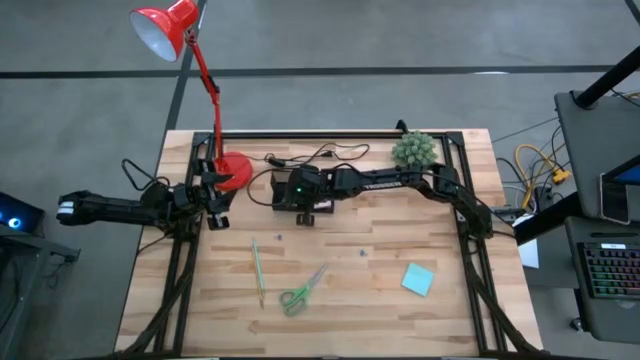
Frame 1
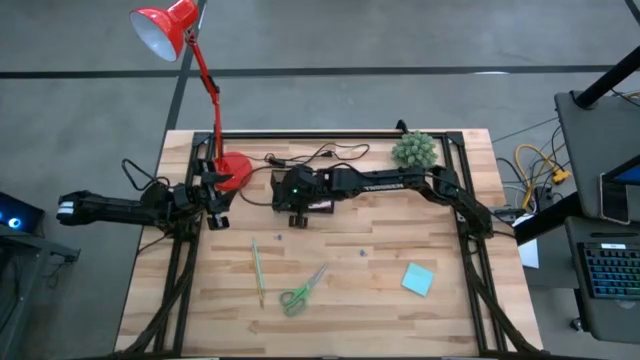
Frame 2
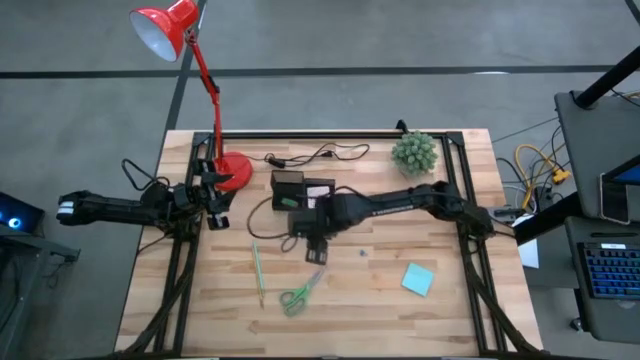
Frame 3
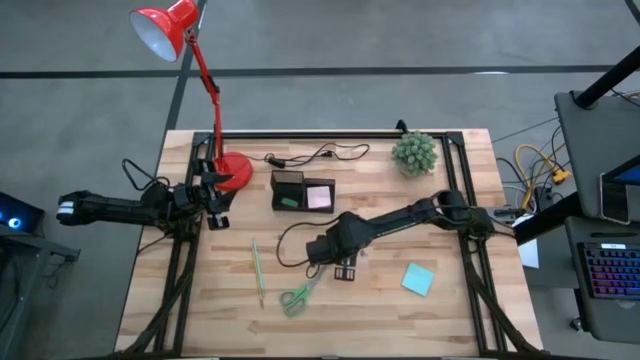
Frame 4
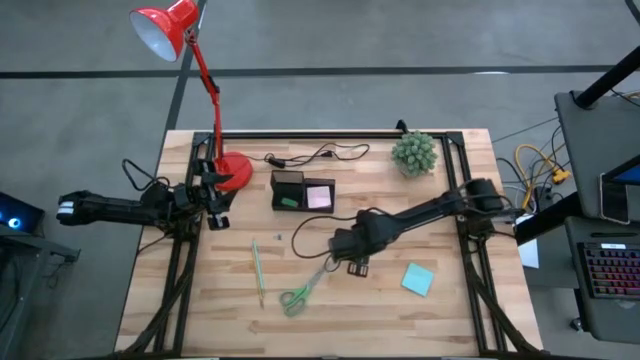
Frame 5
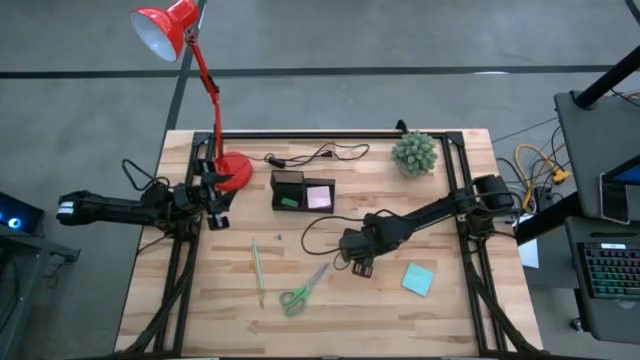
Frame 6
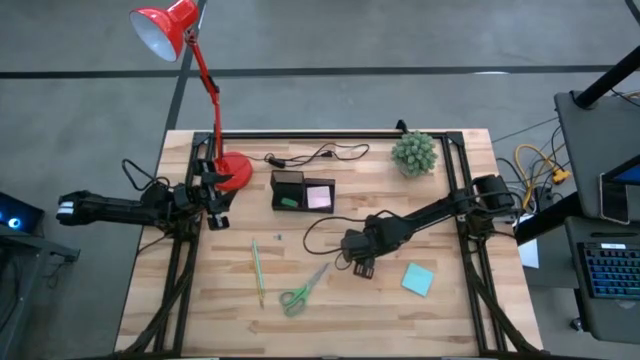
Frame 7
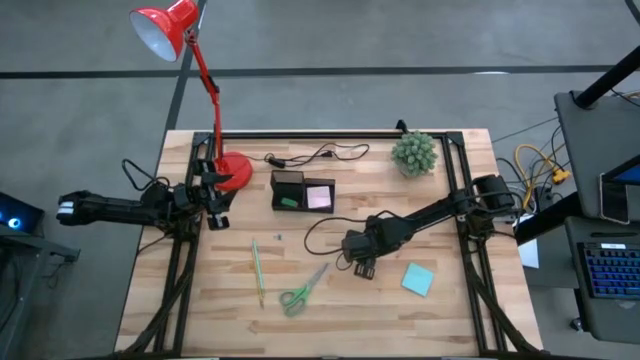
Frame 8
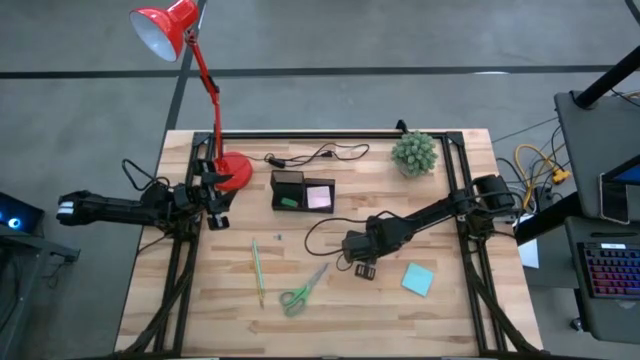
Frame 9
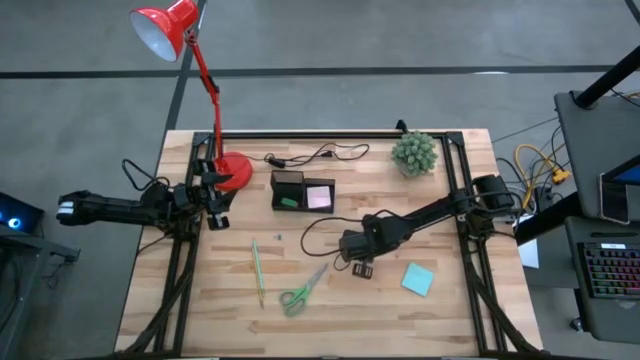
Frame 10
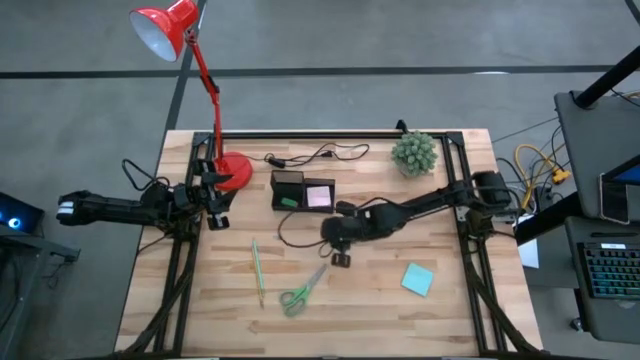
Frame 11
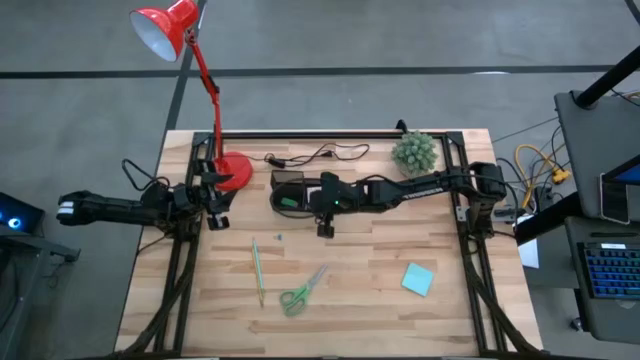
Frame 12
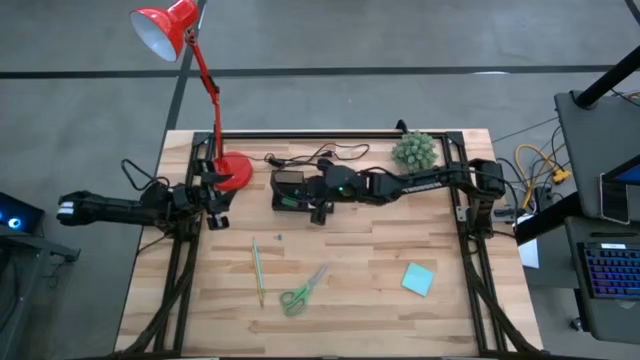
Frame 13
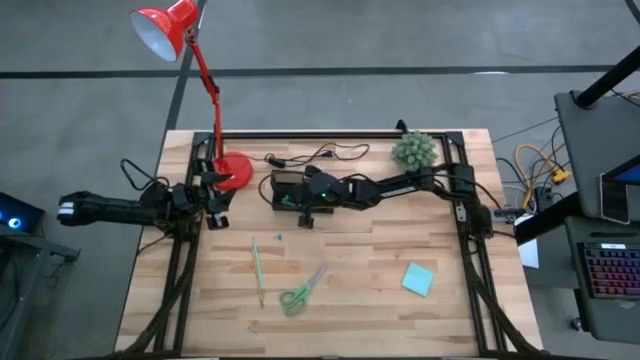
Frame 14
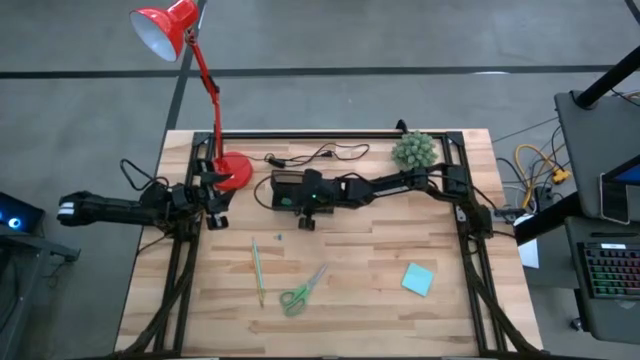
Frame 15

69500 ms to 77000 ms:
Task: Pick and place office supplies into organizer
Put the right blue clip binder into the black mesh desk organizer

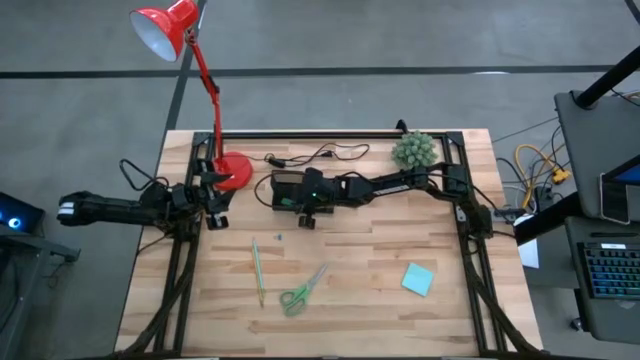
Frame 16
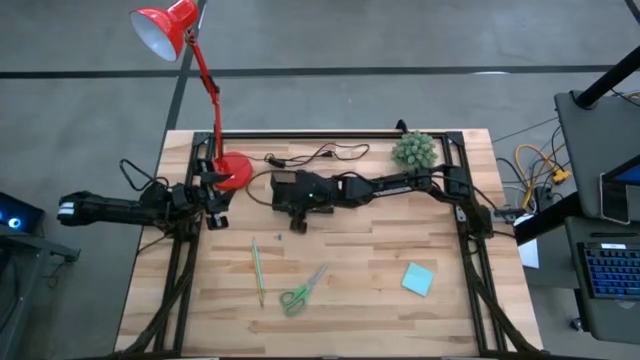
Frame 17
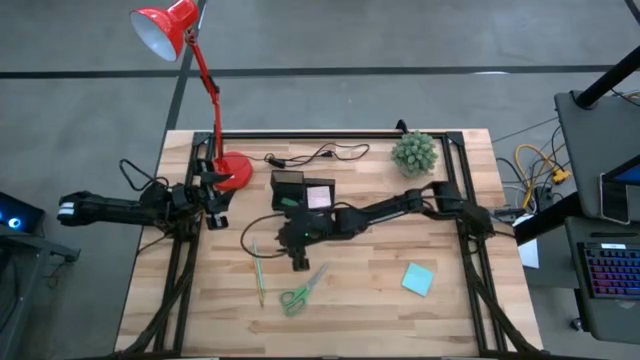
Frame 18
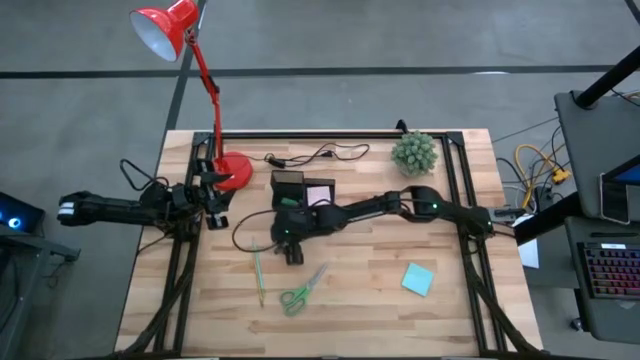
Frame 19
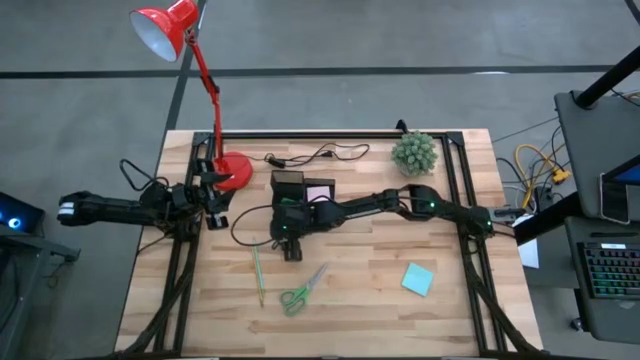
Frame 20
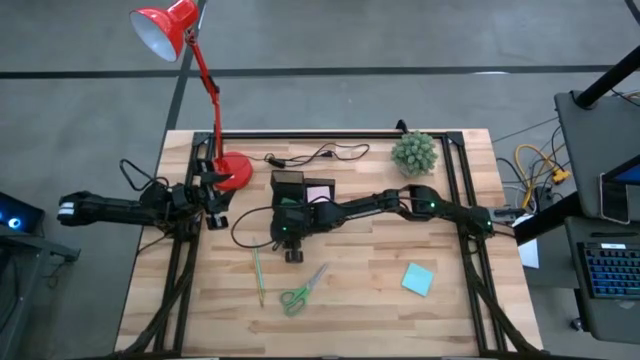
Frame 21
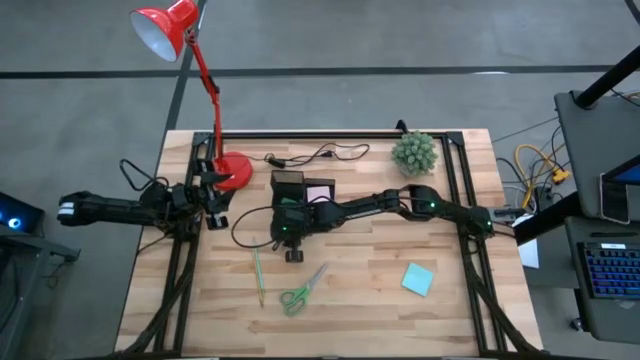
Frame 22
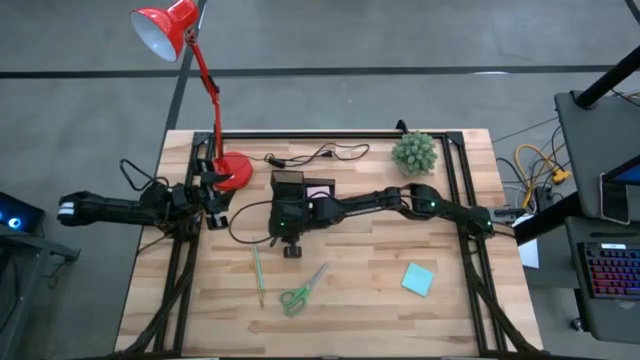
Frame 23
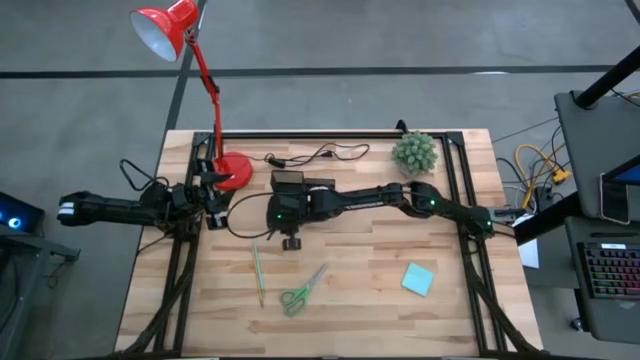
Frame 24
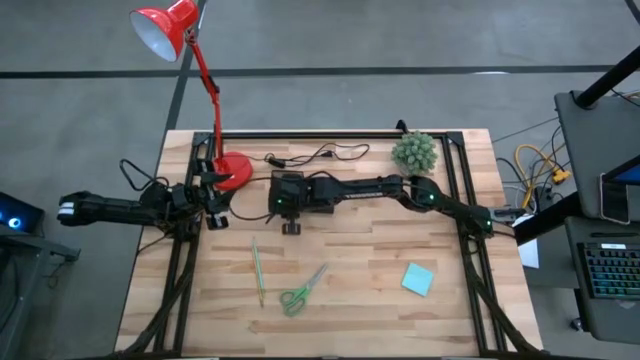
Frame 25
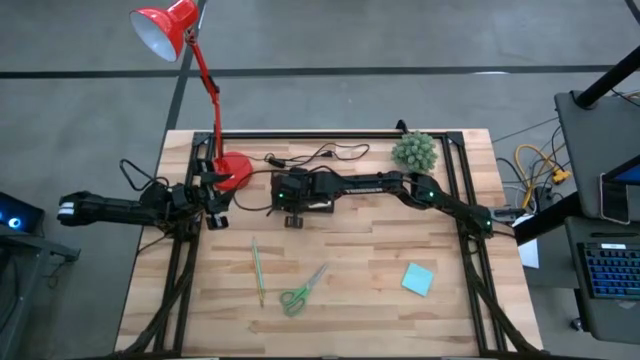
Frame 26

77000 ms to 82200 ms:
Put the blue clip binder into the black mesh desk organizer

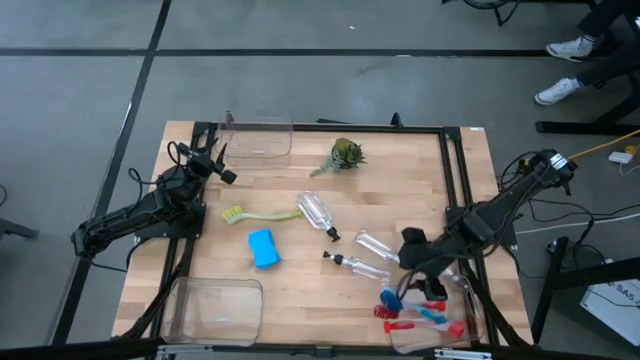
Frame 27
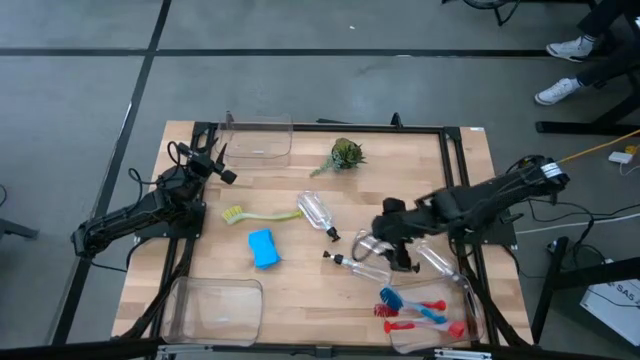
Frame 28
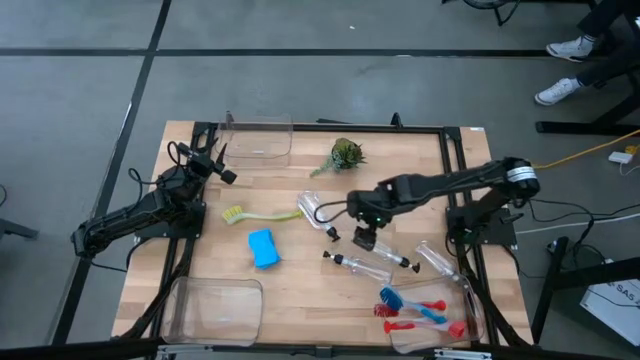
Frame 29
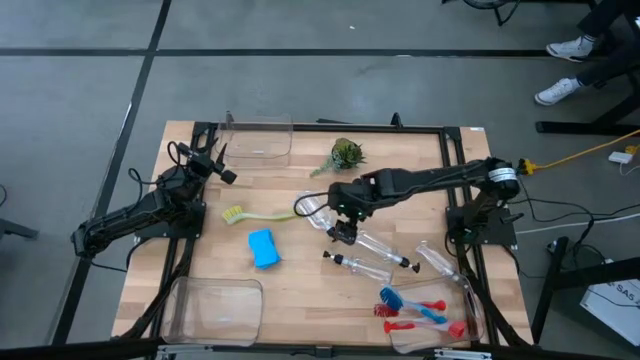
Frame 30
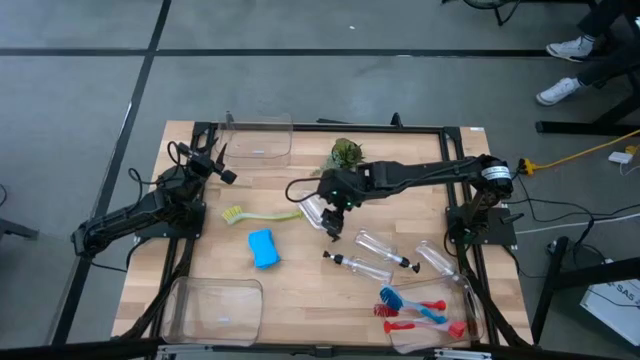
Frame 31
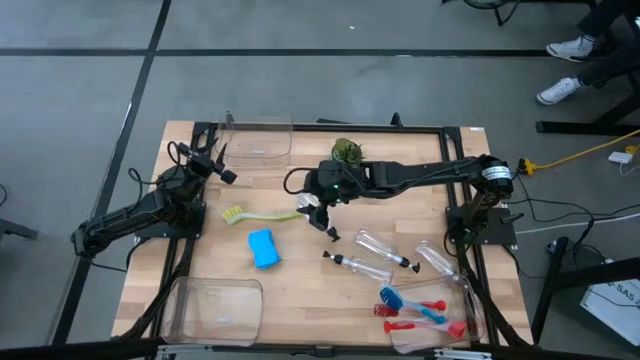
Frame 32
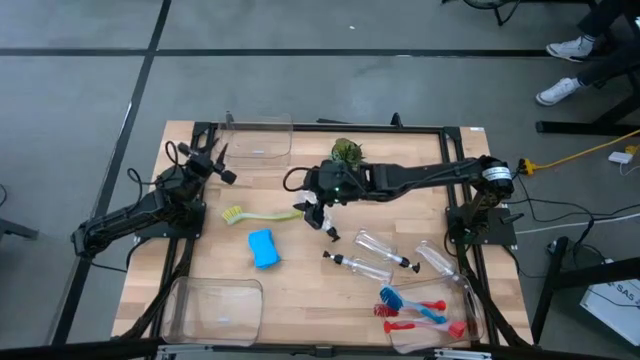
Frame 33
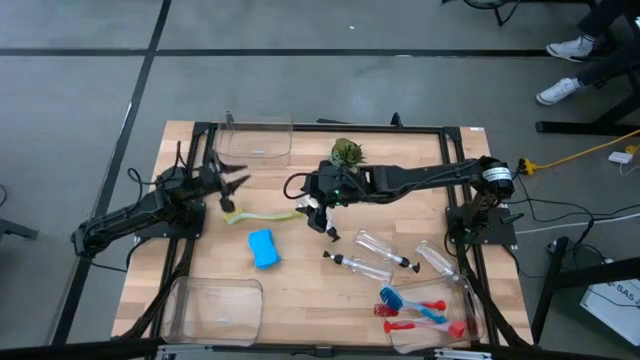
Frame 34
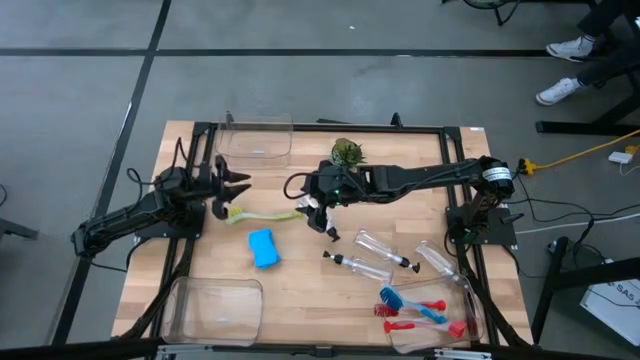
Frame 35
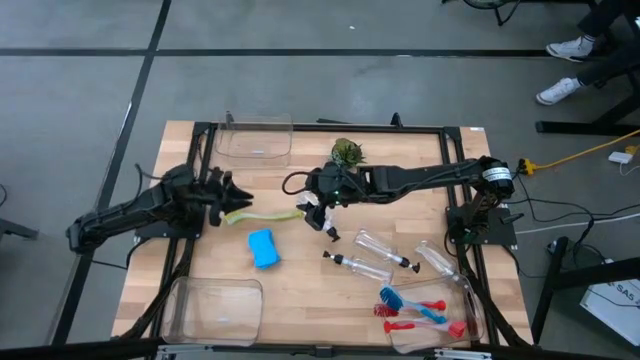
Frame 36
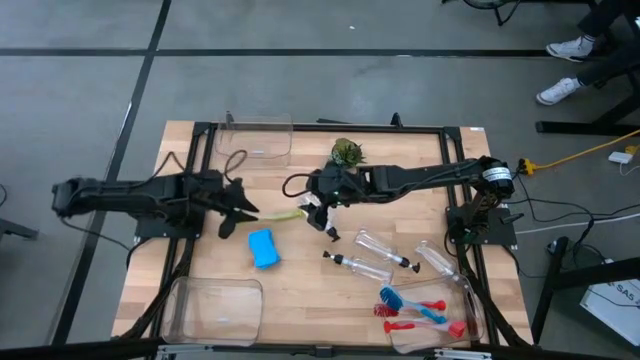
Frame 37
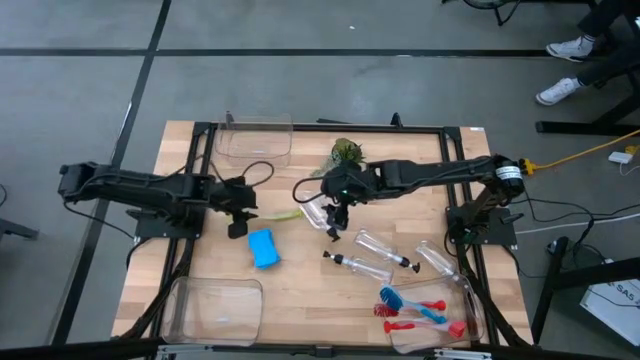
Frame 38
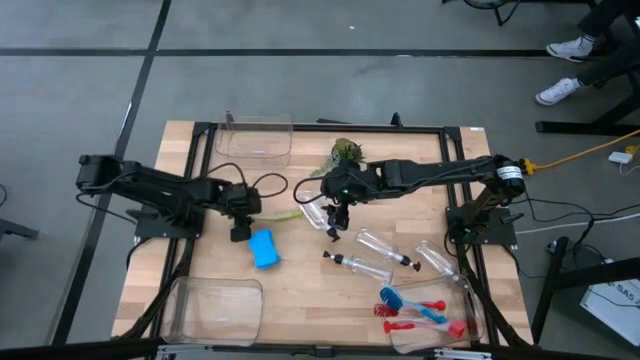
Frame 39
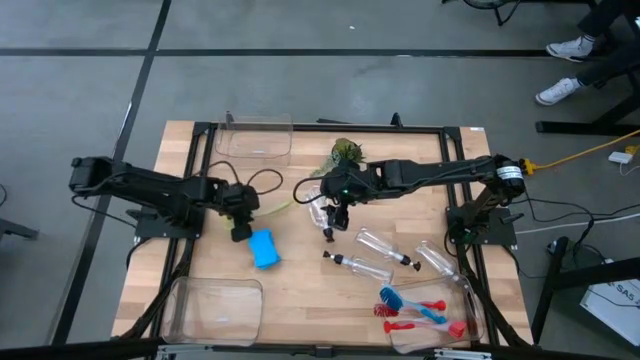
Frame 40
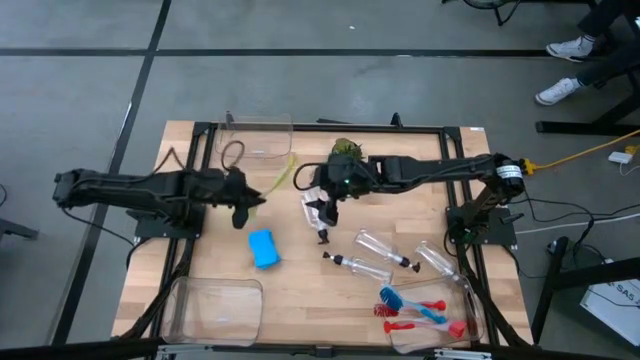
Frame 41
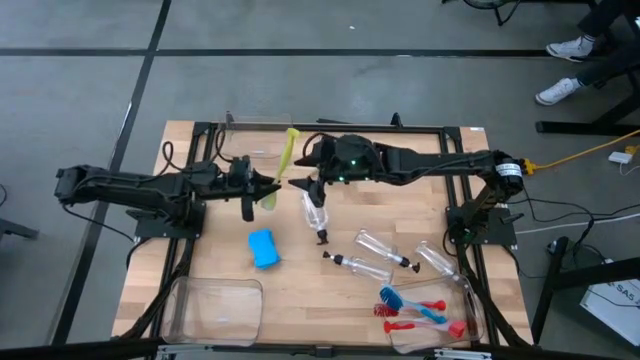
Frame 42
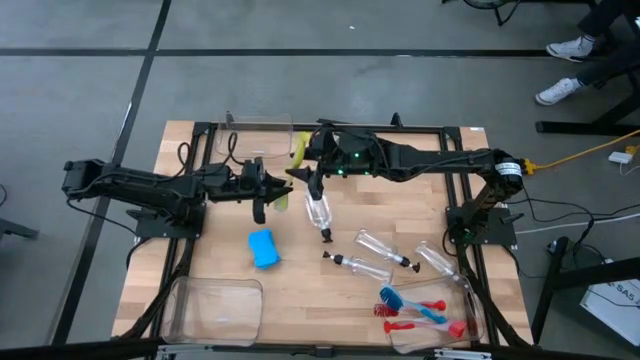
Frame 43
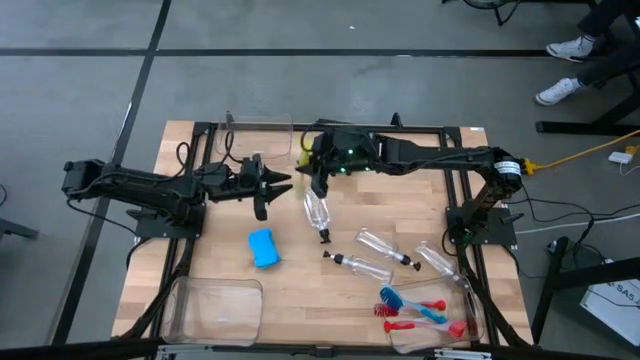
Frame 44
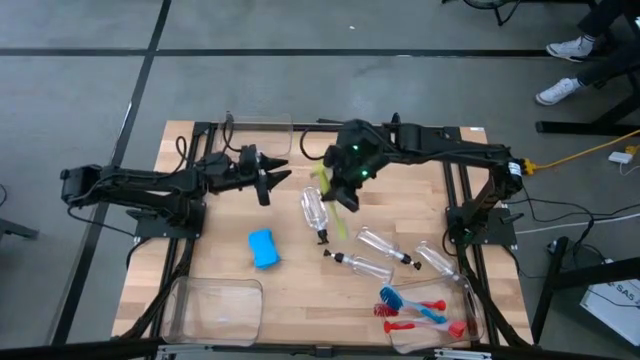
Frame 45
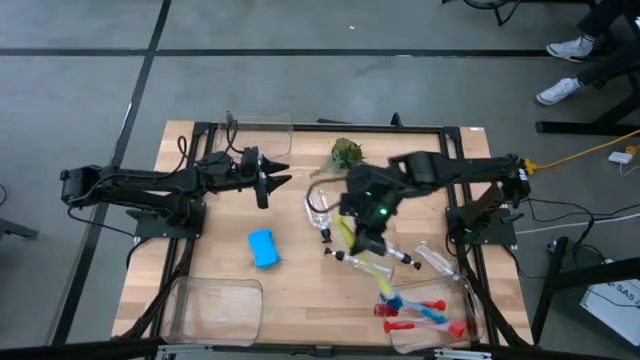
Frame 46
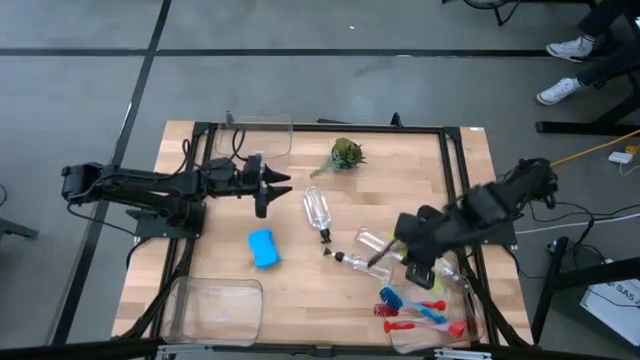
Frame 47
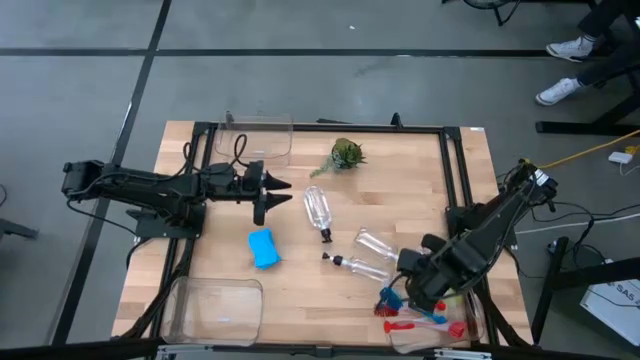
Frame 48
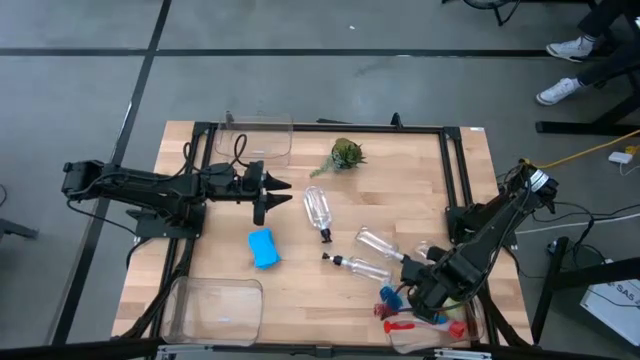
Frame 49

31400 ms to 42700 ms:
Task: Pick & Place Kitchen Sink Supplies
Put the green dish brush into the bottom right transparent bin
